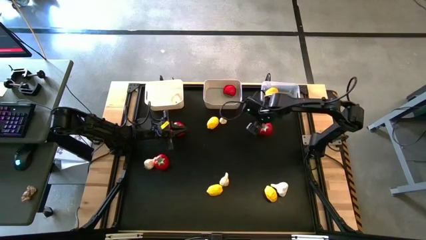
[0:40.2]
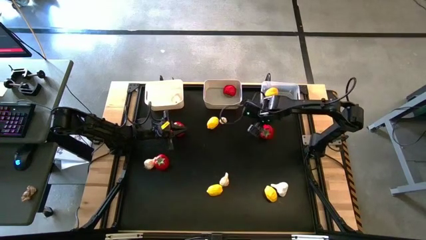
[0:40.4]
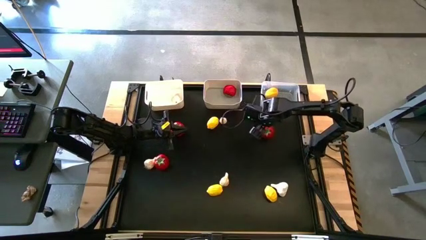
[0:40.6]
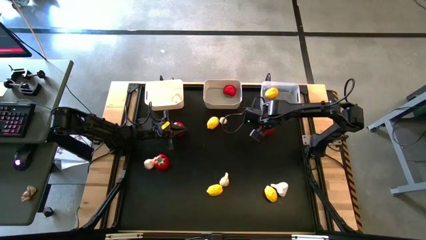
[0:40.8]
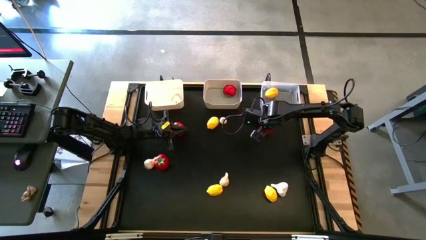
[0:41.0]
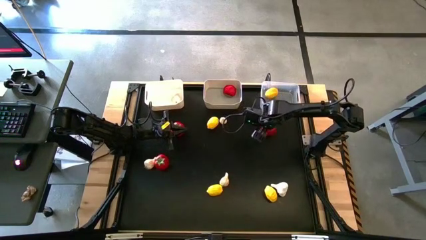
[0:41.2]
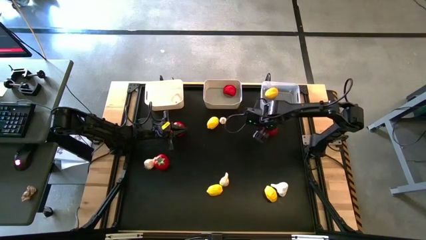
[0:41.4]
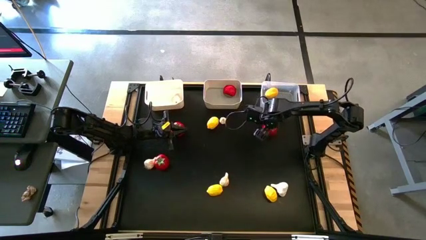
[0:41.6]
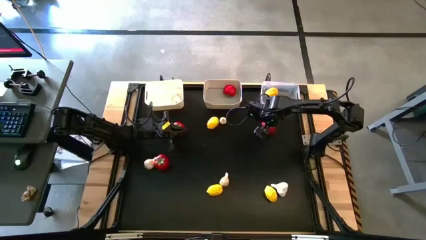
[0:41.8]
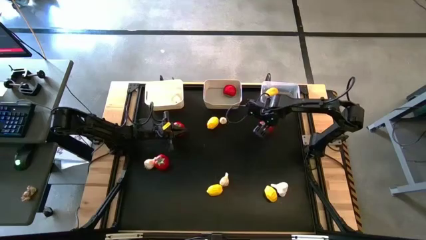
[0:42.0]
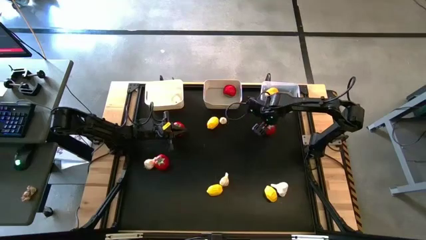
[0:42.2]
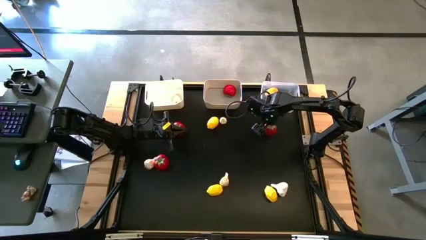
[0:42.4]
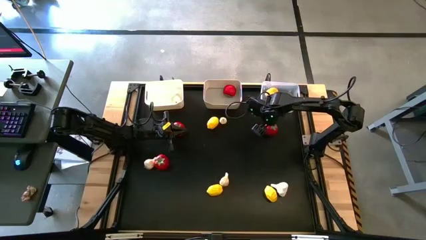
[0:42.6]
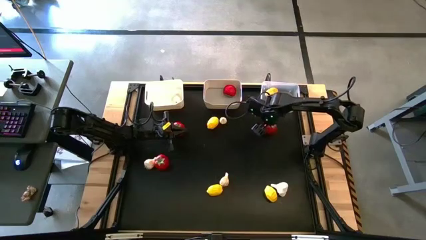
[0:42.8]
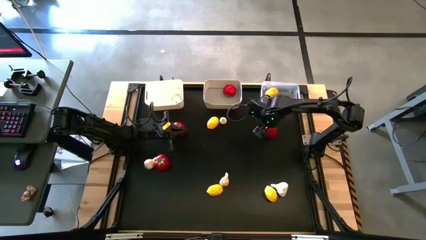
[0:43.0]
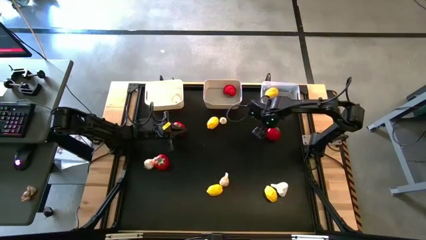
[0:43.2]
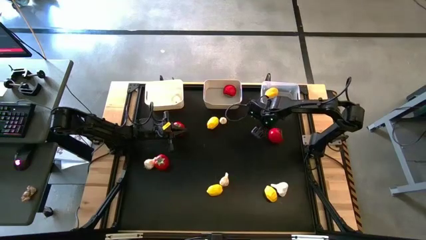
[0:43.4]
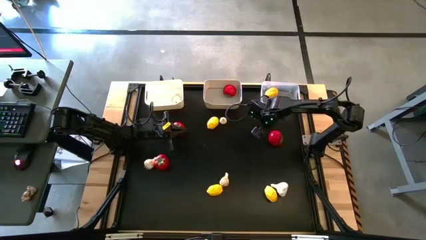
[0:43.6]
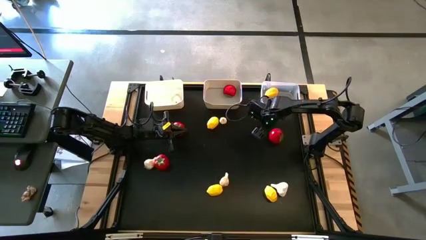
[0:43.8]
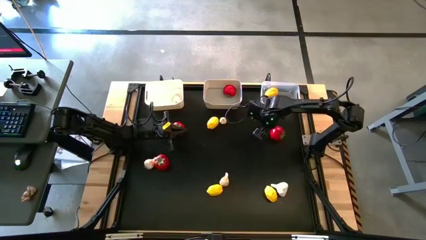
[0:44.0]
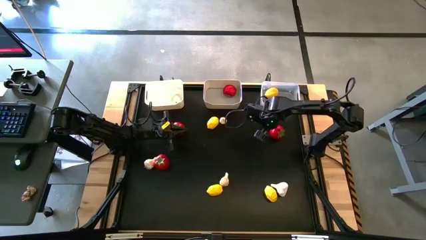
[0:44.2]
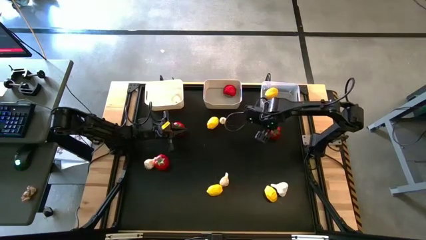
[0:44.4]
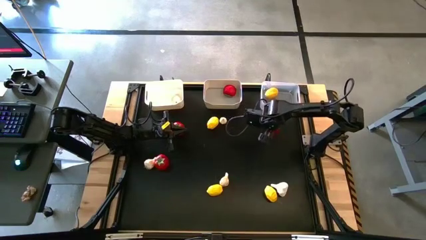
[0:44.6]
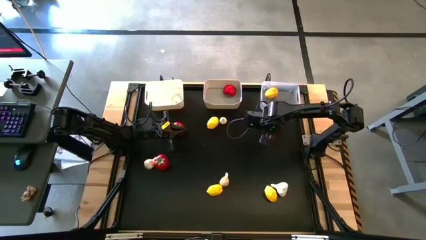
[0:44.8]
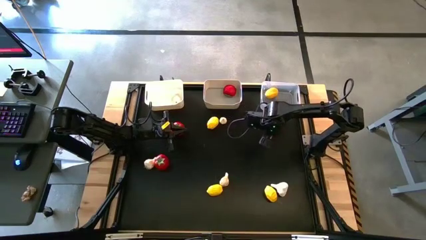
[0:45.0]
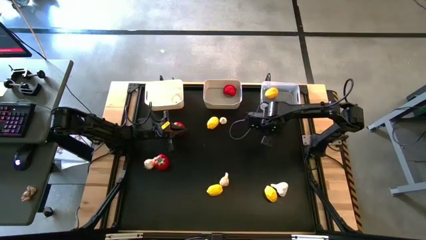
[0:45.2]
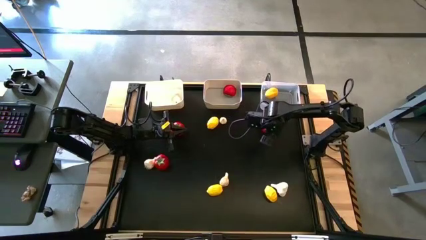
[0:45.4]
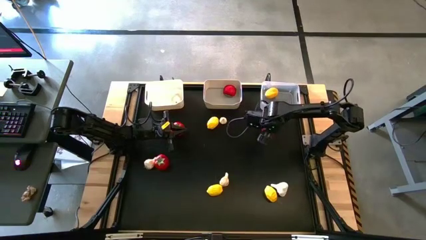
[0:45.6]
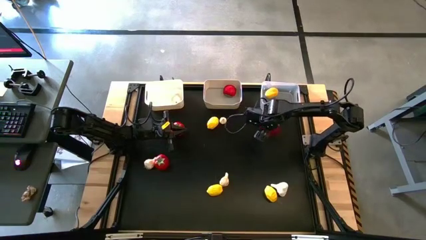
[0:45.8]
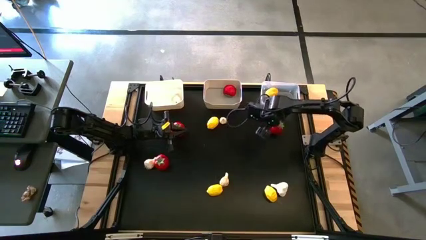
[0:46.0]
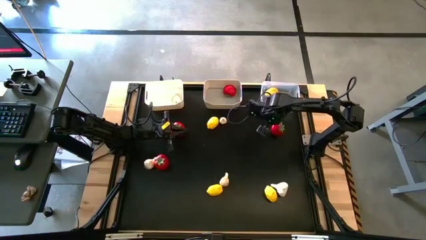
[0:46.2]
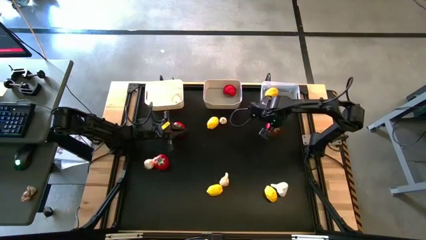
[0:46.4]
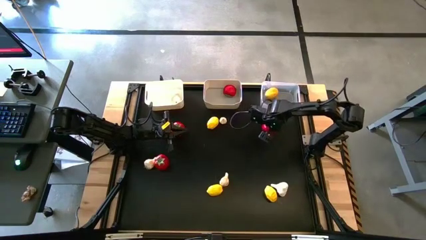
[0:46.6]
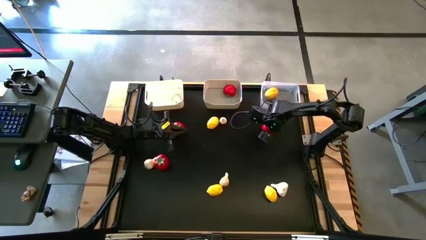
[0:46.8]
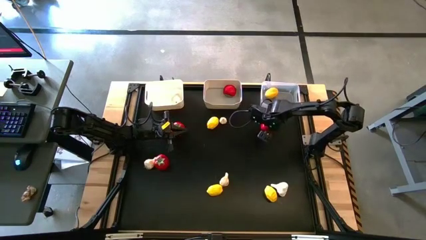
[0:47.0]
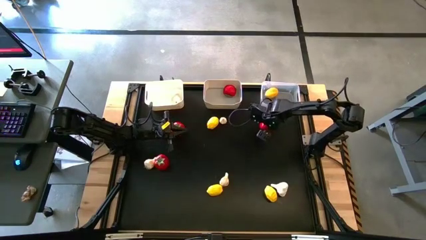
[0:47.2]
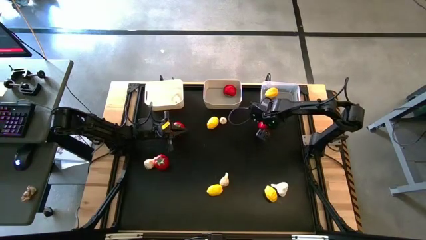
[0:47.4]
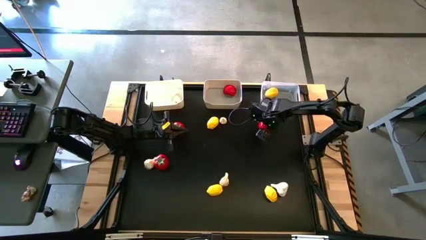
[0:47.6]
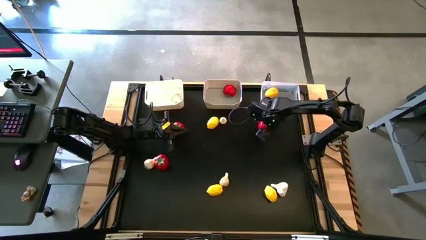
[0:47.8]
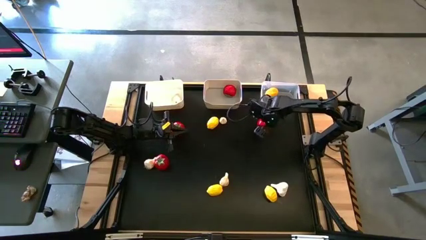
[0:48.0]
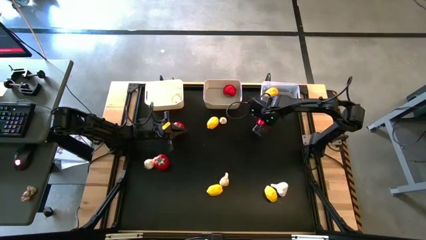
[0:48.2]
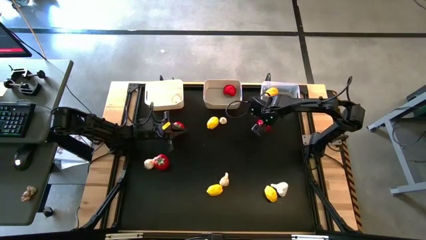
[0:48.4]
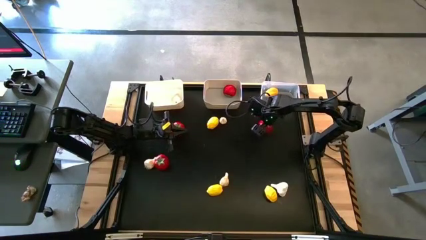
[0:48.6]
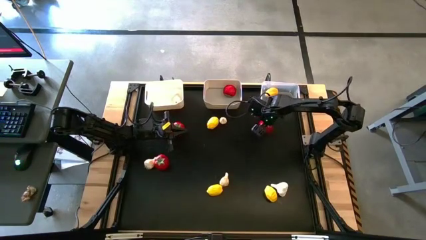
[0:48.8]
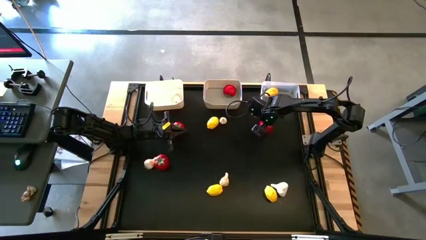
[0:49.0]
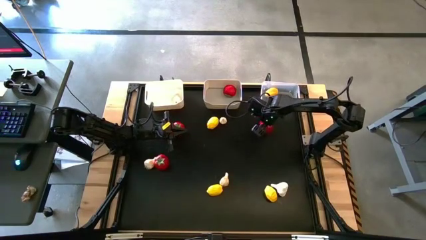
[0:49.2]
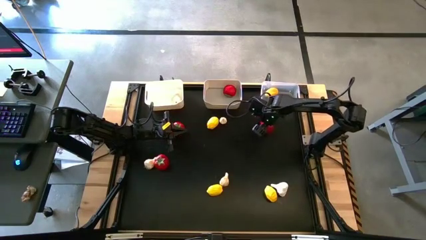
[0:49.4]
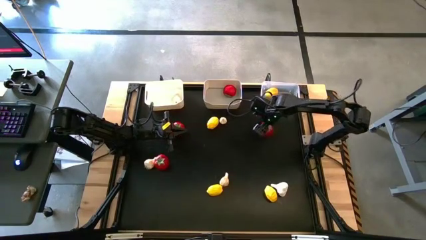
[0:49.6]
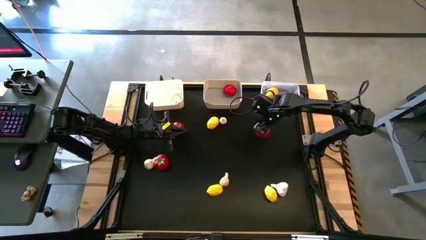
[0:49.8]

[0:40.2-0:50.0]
Task: Sort produce into baskets
Put the top right tomato into the gray bin

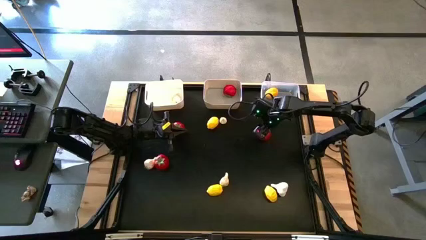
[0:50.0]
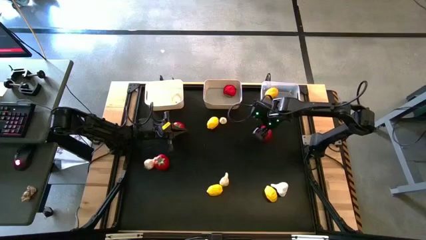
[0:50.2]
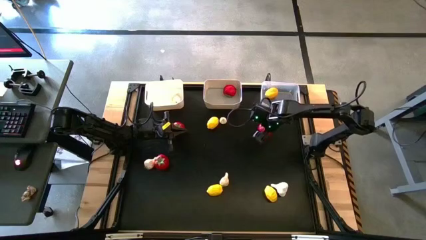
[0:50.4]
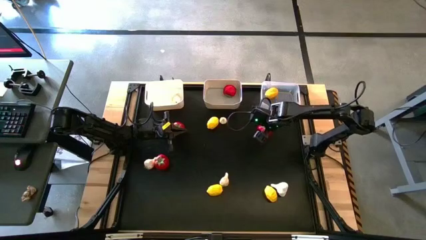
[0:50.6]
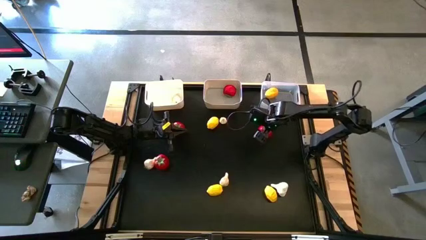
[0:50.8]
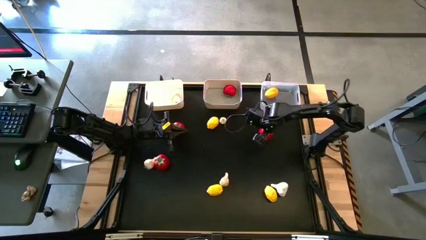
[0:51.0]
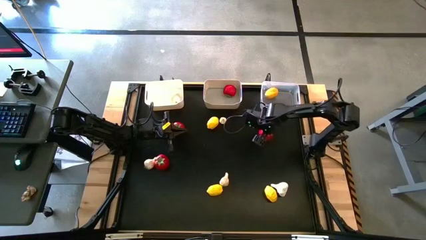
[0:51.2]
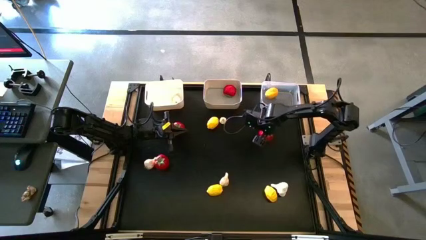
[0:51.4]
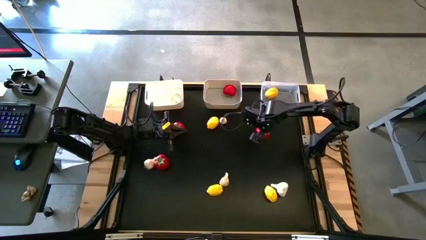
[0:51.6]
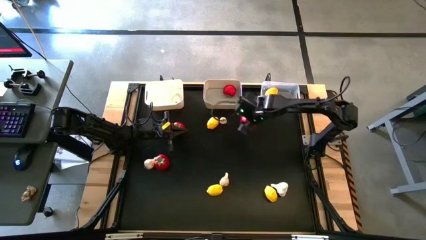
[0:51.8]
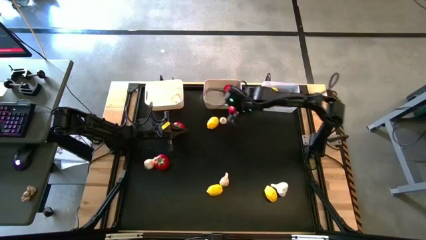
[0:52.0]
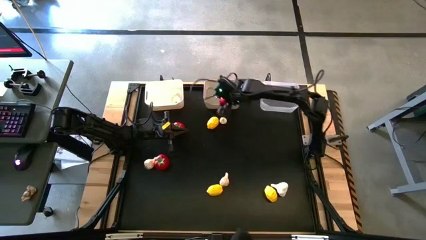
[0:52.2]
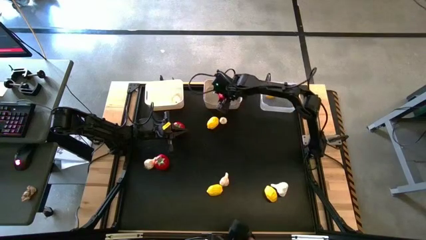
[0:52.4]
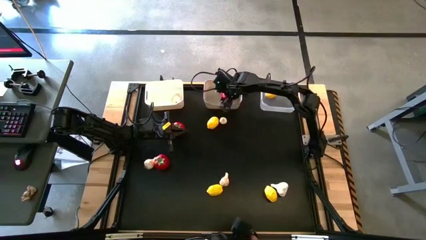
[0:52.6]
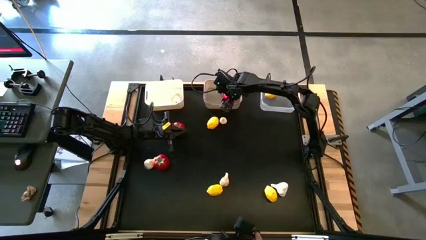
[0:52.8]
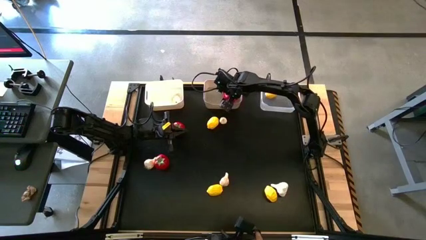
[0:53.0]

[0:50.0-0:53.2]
Put the tomato into the gray bin
